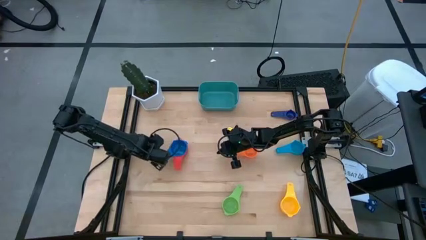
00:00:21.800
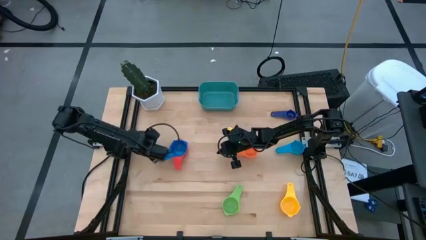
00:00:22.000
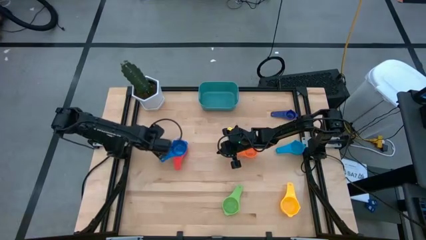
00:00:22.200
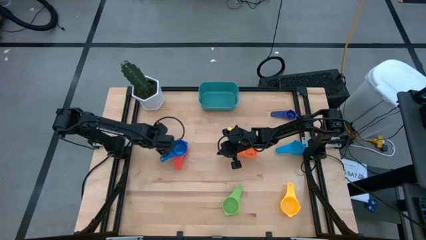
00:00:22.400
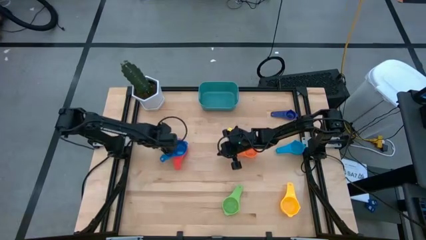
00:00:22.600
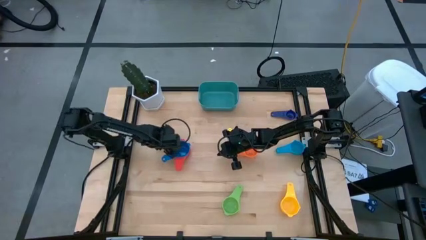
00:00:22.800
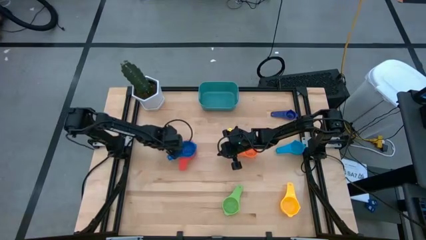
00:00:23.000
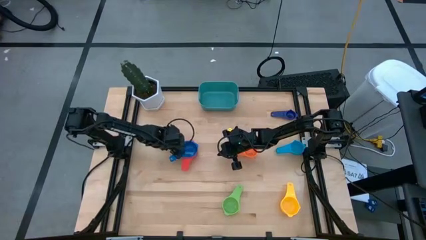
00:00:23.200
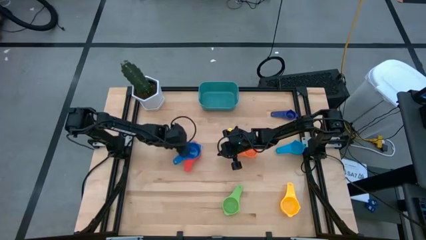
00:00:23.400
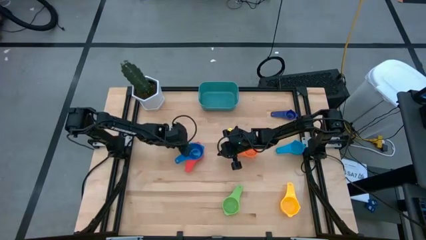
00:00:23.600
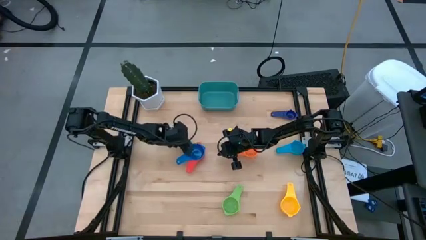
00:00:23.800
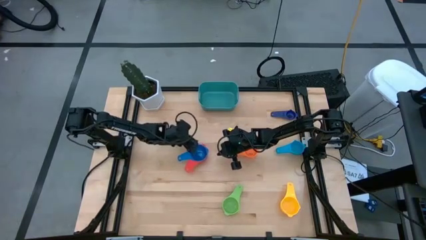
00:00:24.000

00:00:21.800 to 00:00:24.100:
Task: Nest measuring cups in basket
Move the stacked measuring cups slightly right on the table

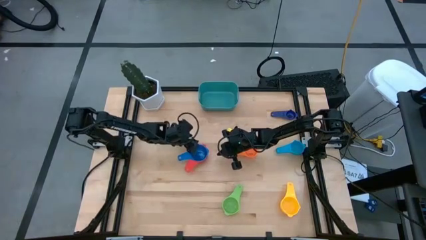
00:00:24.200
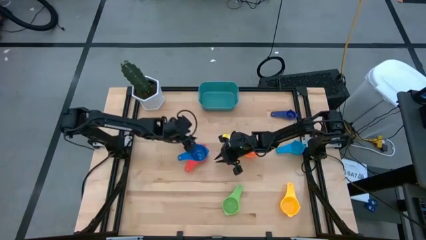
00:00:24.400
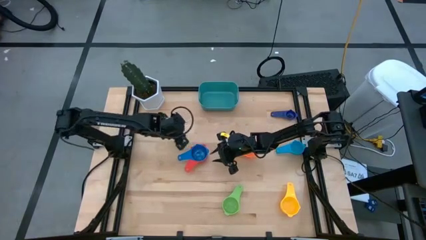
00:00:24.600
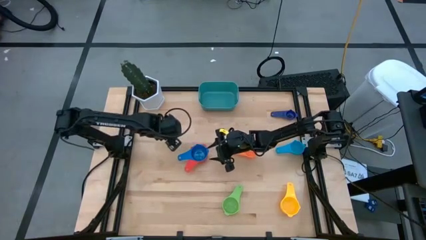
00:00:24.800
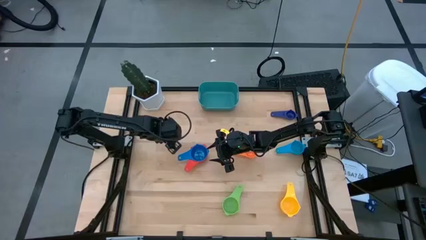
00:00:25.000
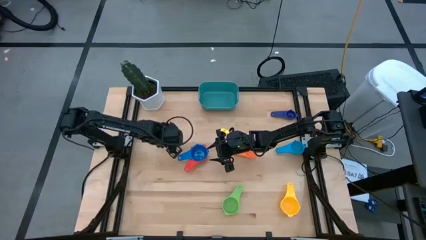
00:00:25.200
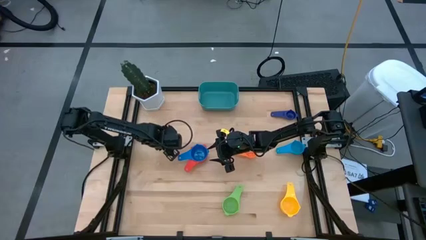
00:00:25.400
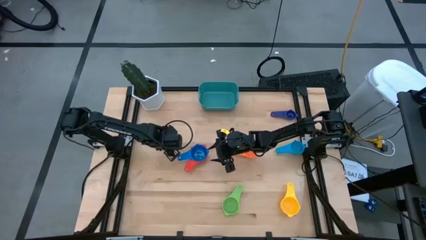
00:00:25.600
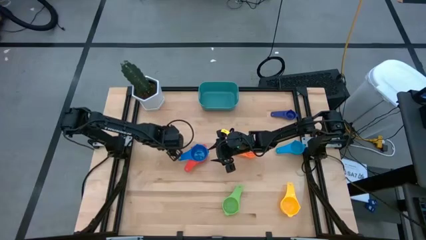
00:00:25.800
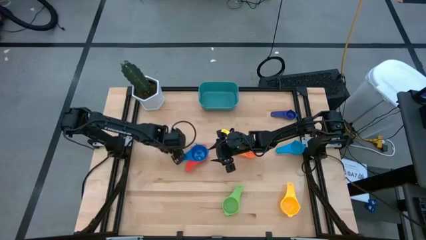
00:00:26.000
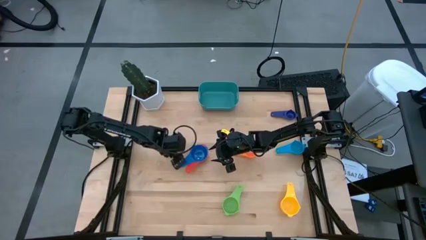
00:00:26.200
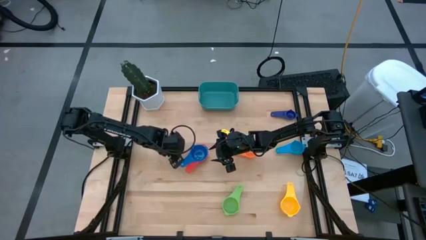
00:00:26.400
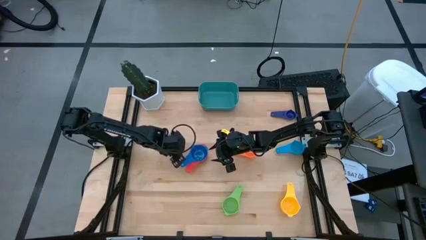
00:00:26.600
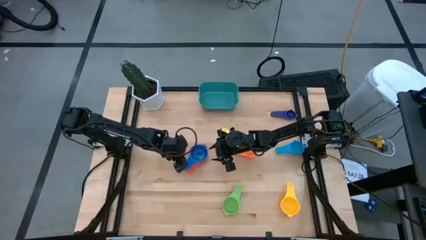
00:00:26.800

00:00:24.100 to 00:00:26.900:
Adjust the stacked measuring cups

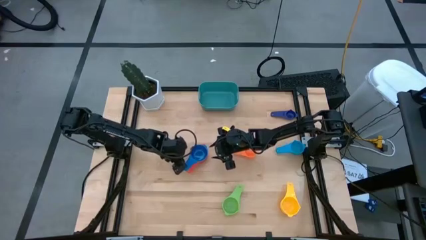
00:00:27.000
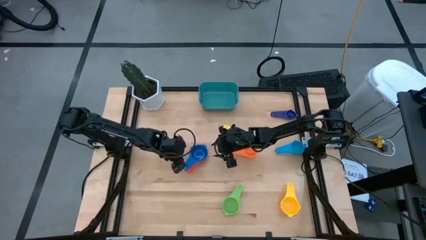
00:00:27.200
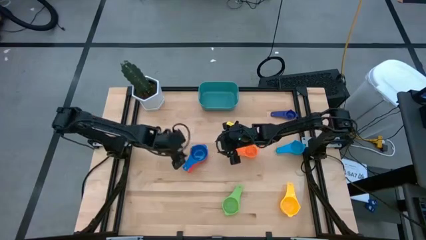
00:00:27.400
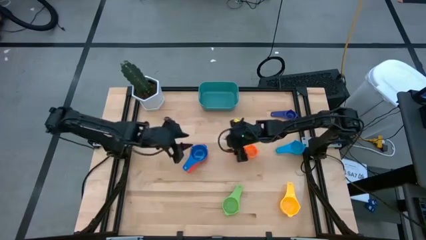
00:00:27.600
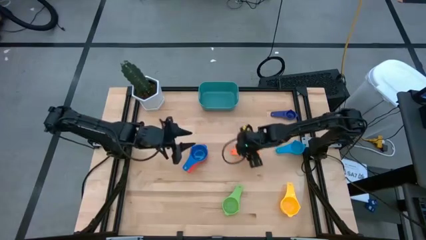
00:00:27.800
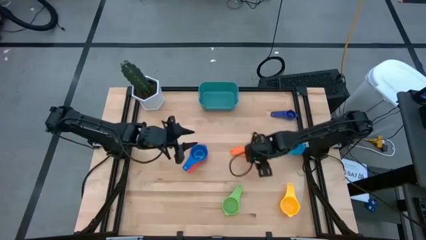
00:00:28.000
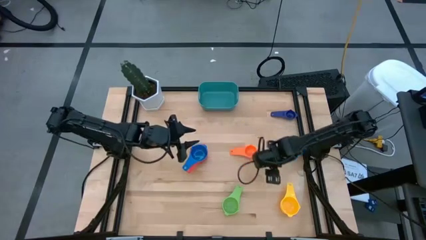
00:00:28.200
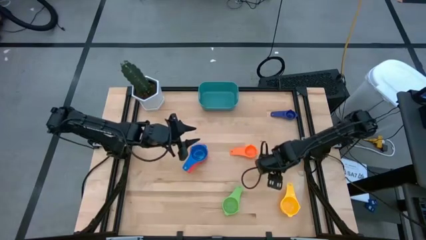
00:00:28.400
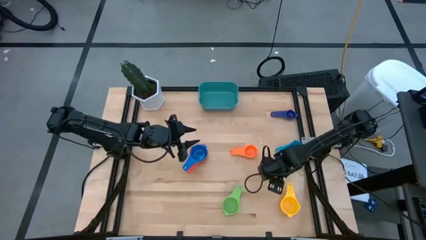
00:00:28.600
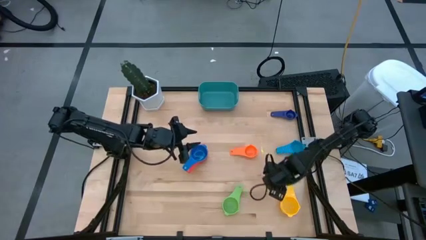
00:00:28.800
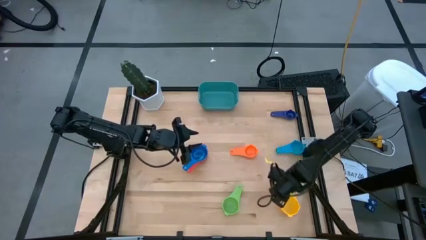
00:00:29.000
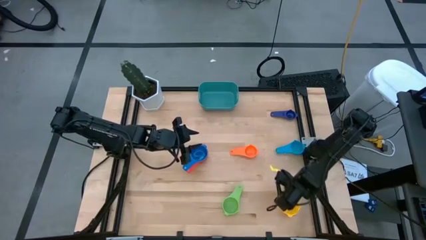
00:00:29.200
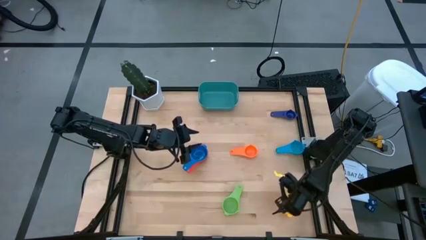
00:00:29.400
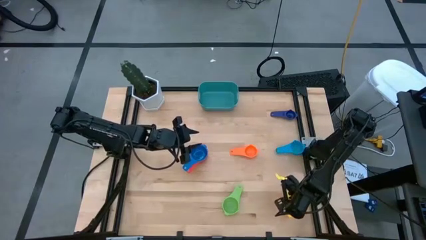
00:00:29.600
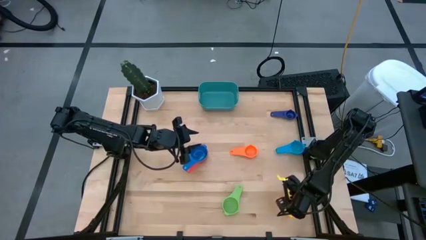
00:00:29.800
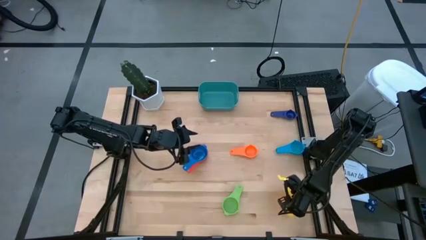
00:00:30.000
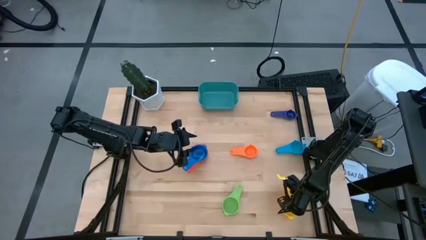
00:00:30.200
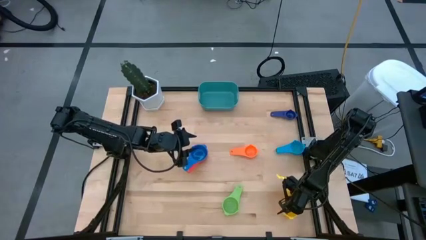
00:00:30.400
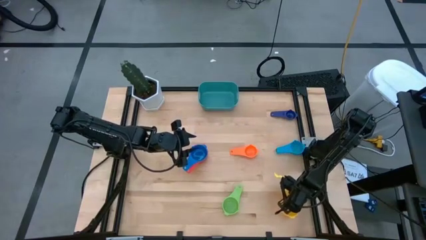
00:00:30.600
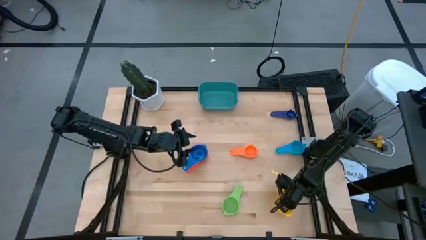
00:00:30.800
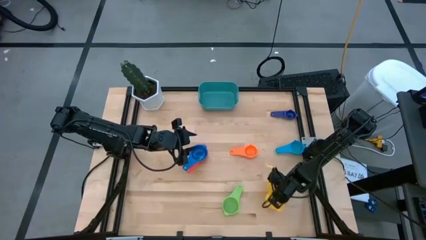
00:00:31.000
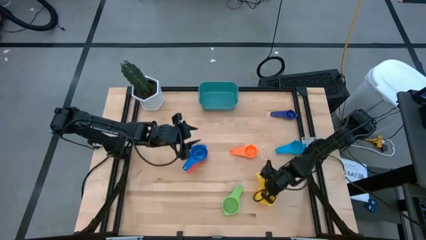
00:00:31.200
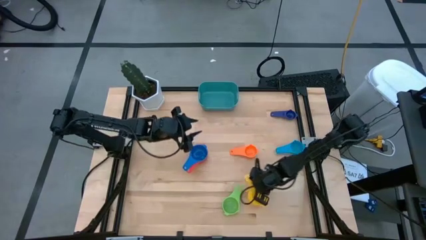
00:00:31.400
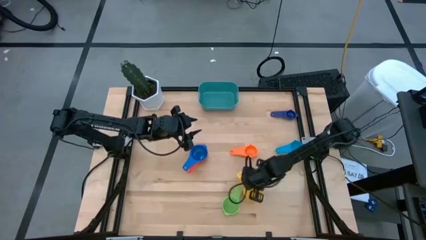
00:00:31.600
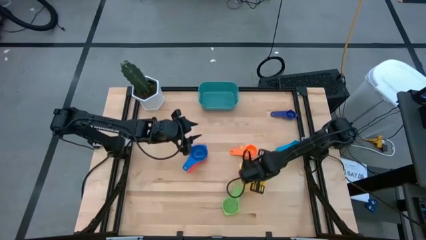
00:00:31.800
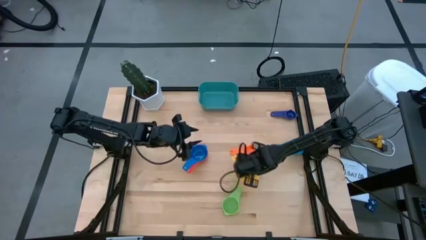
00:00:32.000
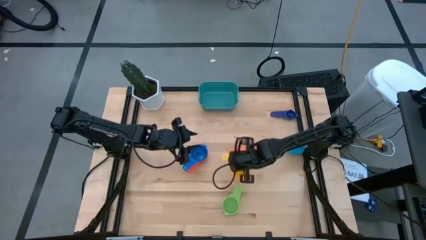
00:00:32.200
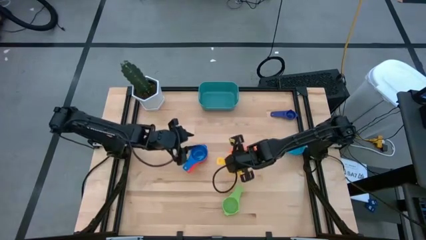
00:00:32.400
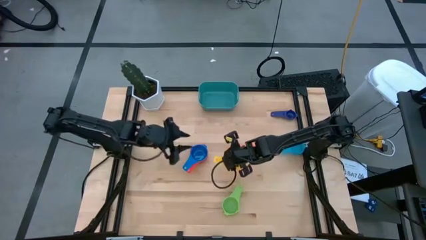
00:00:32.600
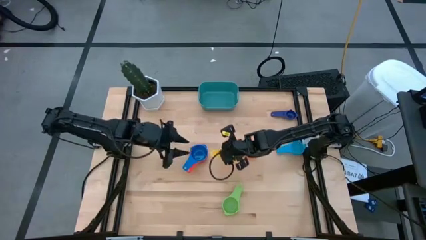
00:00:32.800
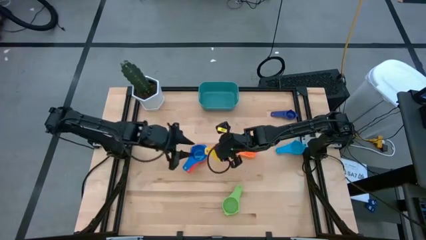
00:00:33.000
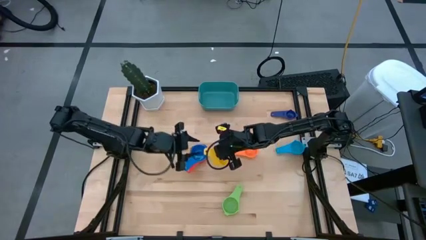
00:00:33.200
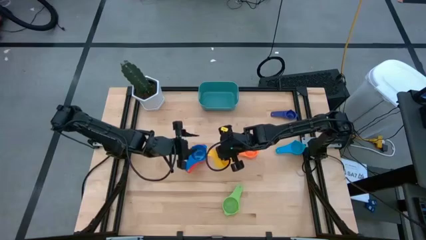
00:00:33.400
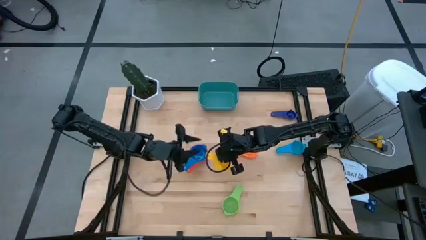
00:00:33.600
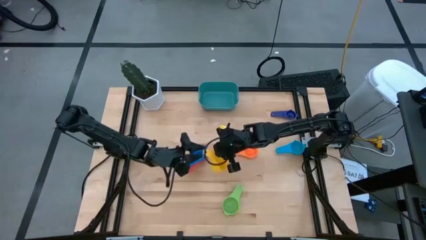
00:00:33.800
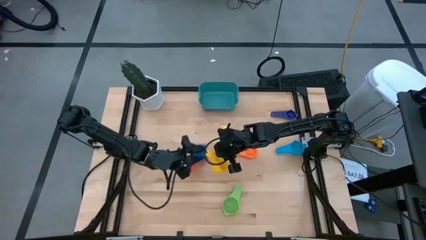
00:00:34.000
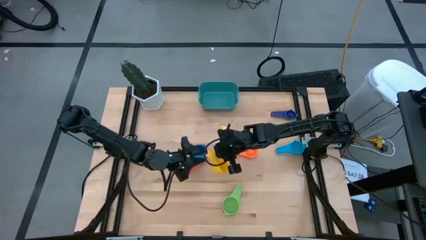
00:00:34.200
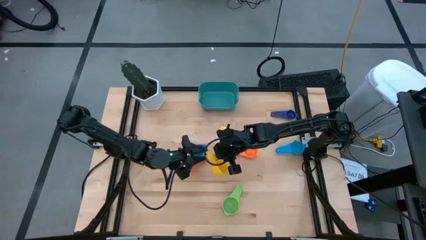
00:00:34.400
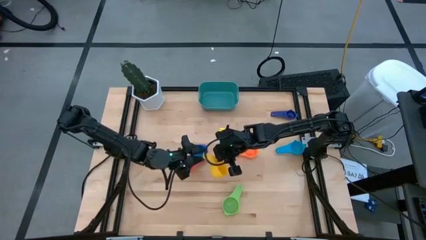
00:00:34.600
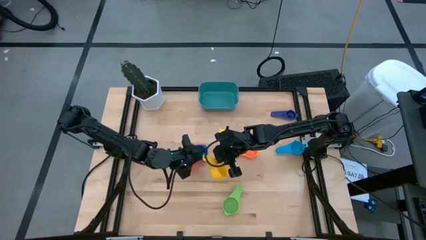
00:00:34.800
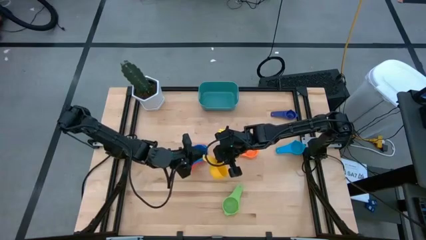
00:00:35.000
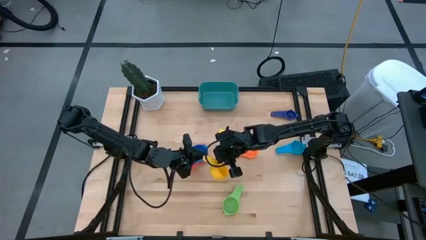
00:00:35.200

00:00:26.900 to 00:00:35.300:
Stack the yellow measuring cup on the blue measuring cup

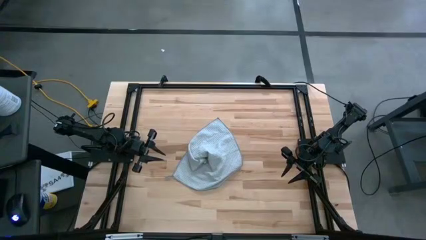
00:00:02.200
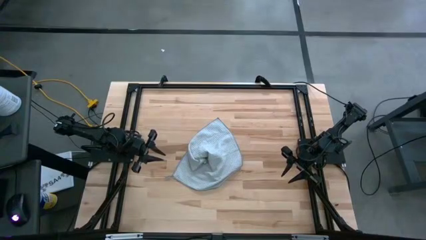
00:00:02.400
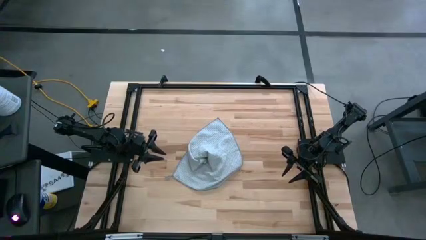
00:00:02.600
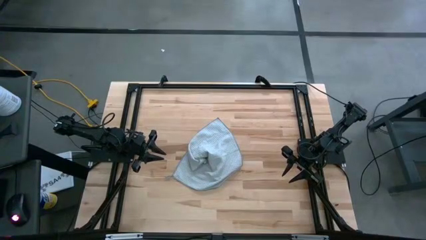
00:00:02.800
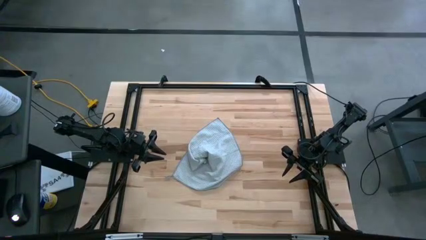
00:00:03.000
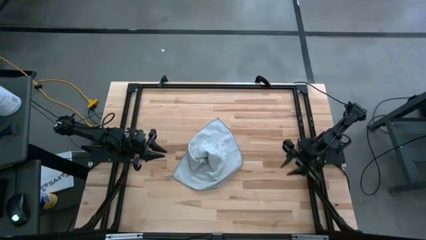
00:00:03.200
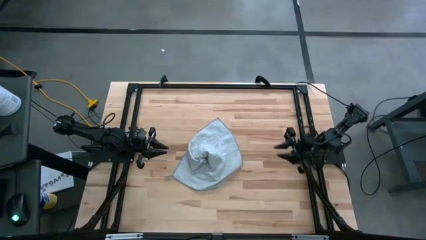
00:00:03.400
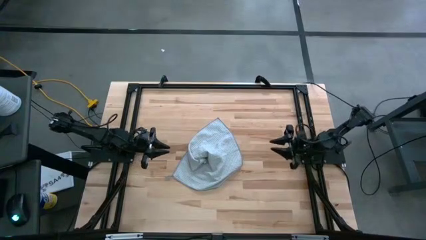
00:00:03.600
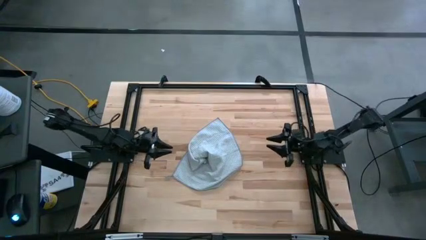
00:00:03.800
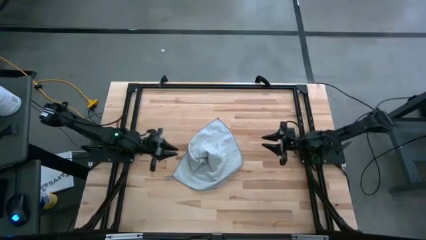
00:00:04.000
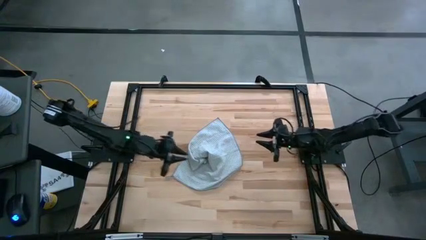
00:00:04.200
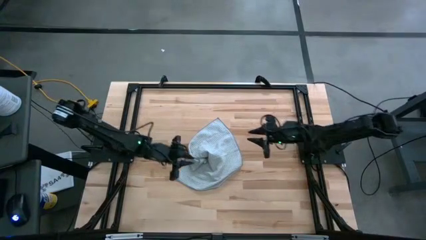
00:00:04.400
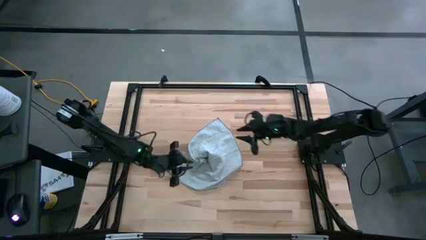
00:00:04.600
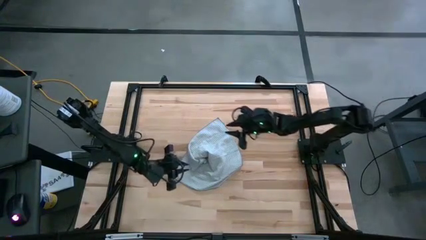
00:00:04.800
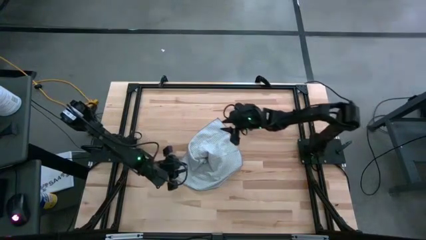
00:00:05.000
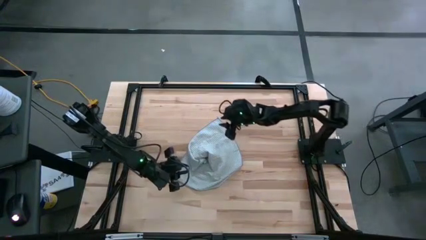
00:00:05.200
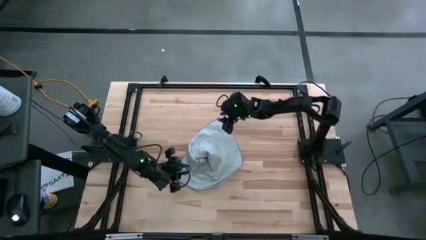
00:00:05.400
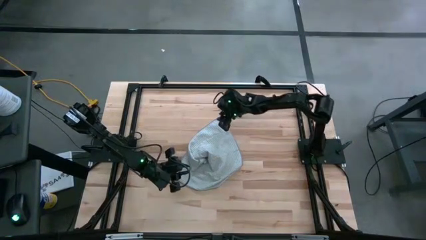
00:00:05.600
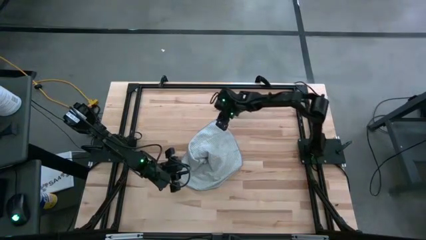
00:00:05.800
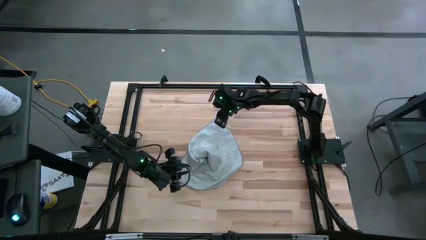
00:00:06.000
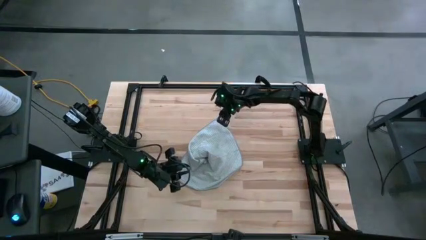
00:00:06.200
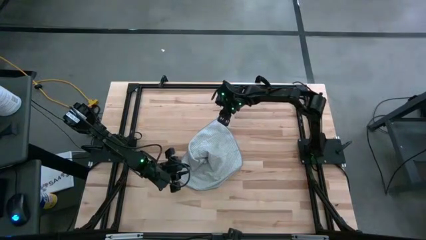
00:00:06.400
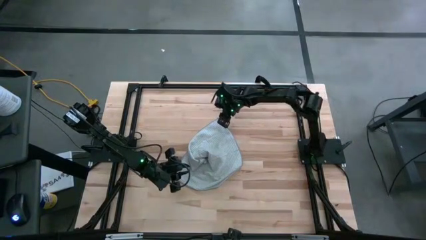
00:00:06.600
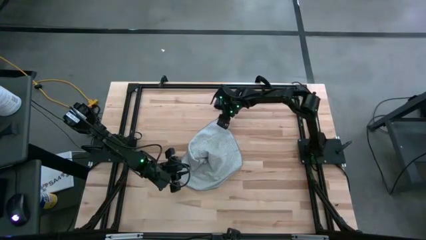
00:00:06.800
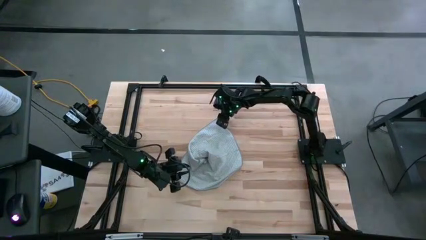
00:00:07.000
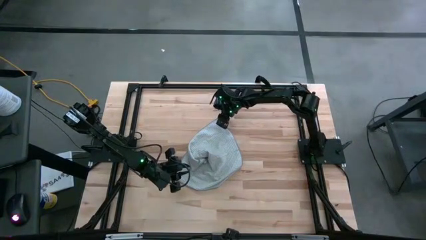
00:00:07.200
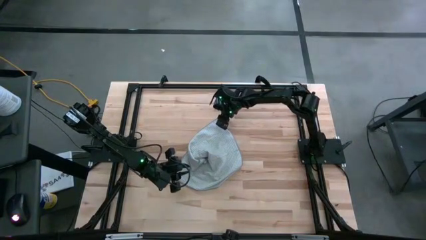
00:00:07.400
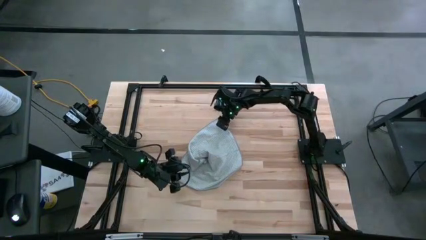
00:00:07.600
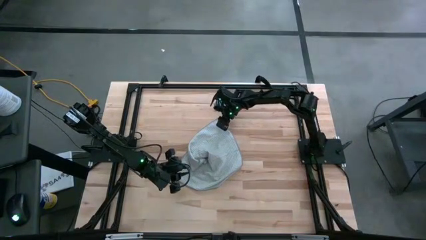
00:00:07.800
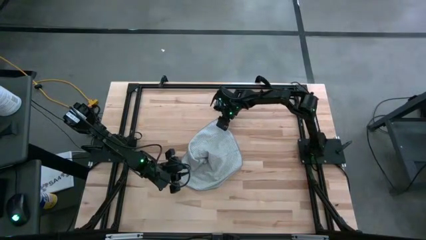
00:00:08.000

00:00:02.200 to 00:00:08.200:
Task: Fold microfiber towels
Fold the gray towel
